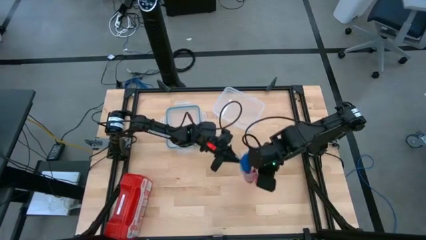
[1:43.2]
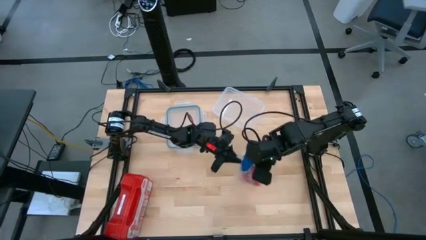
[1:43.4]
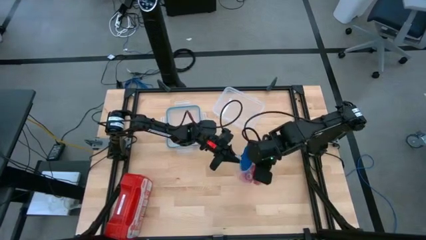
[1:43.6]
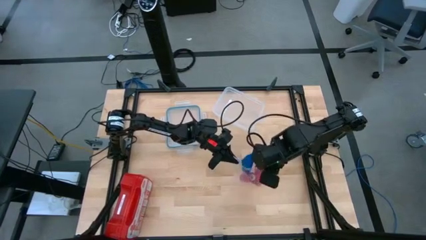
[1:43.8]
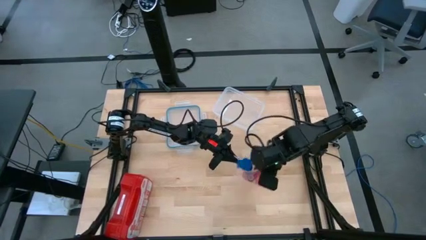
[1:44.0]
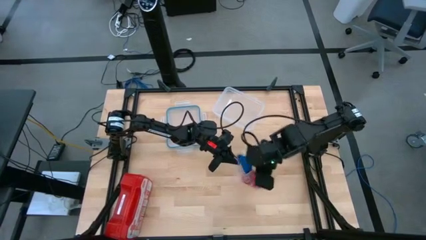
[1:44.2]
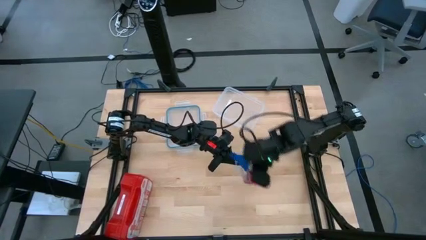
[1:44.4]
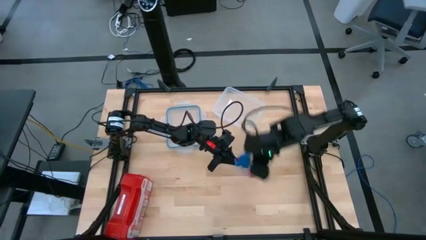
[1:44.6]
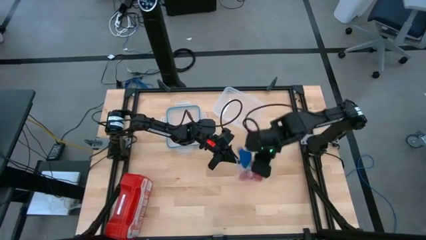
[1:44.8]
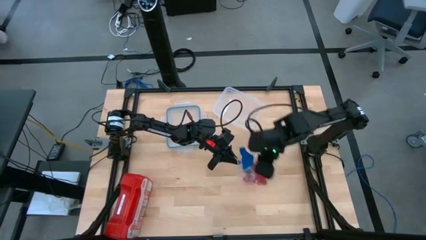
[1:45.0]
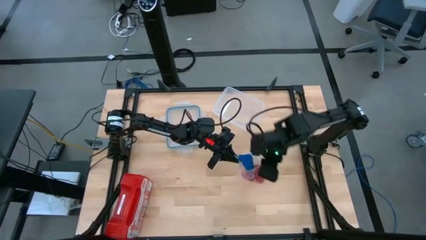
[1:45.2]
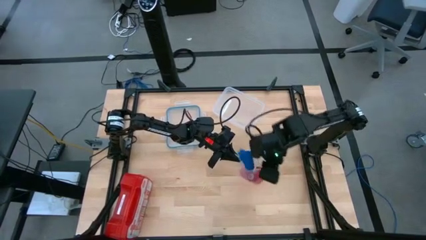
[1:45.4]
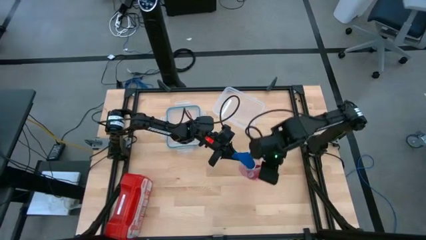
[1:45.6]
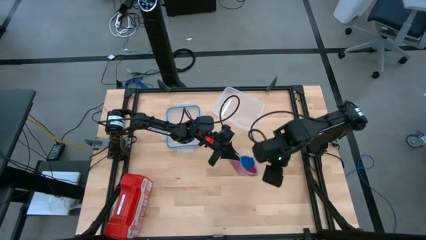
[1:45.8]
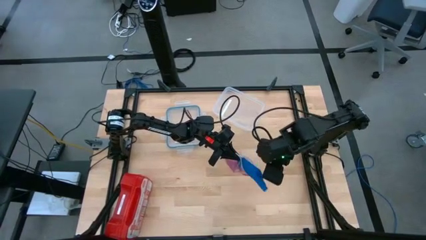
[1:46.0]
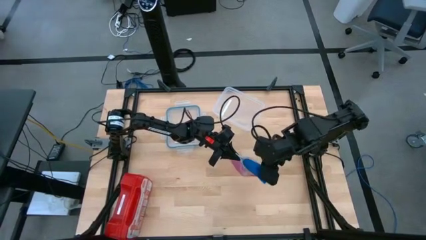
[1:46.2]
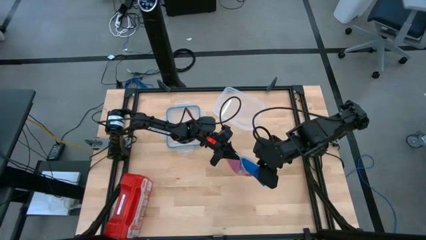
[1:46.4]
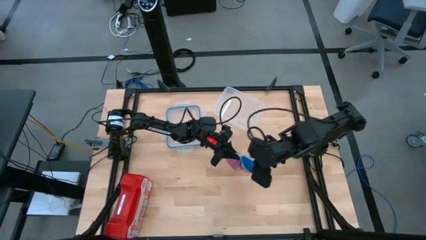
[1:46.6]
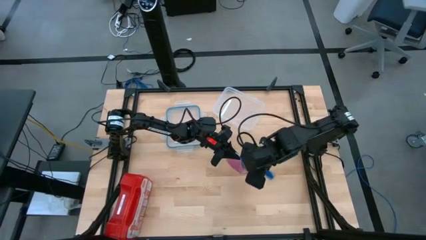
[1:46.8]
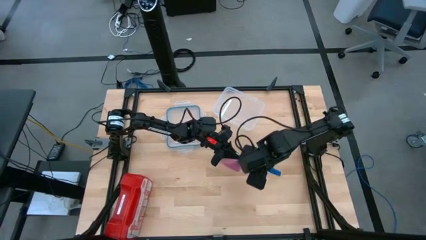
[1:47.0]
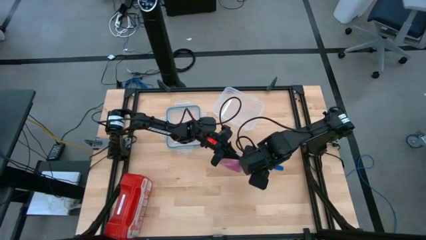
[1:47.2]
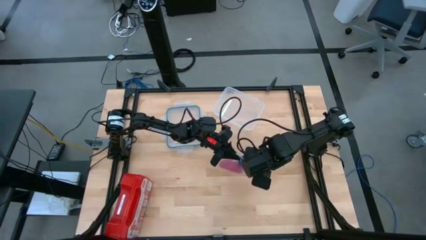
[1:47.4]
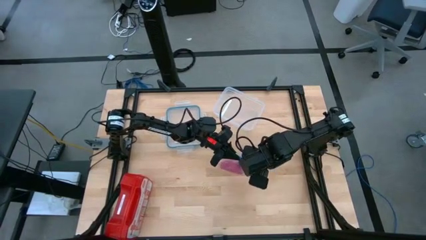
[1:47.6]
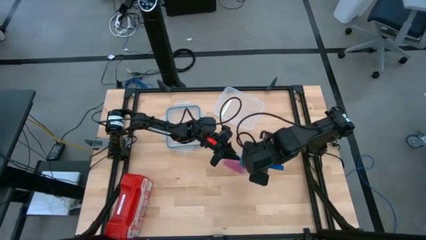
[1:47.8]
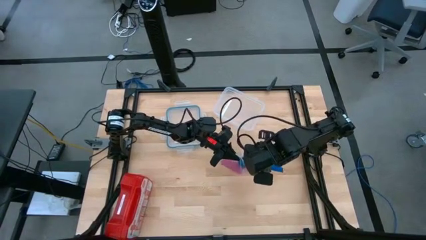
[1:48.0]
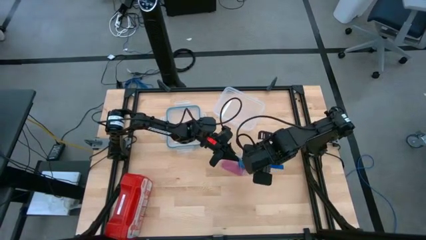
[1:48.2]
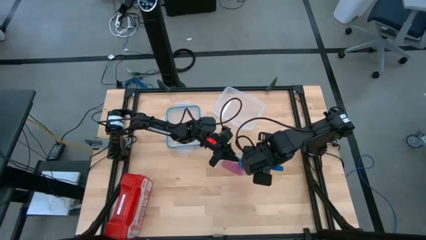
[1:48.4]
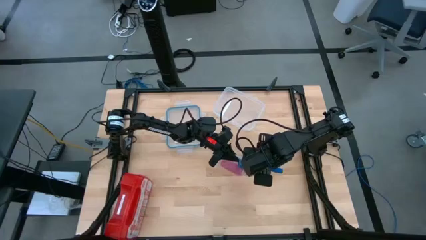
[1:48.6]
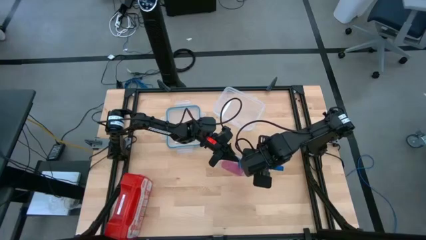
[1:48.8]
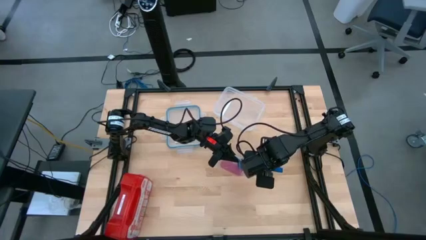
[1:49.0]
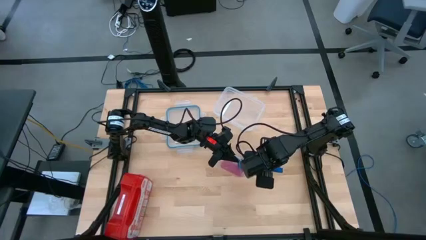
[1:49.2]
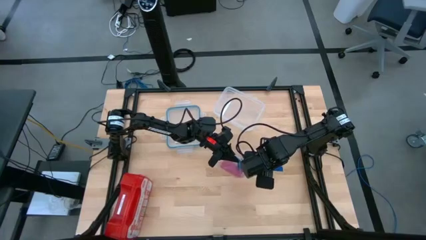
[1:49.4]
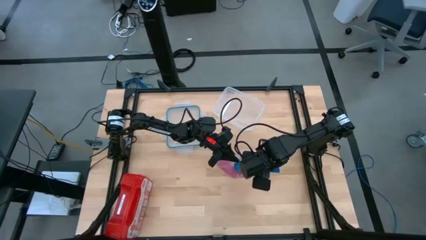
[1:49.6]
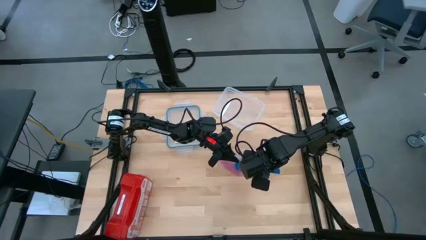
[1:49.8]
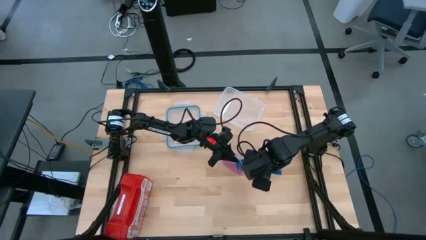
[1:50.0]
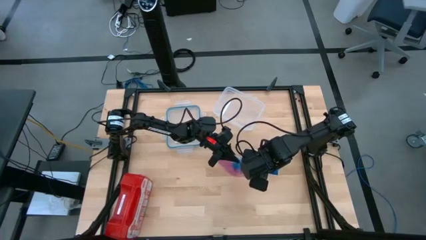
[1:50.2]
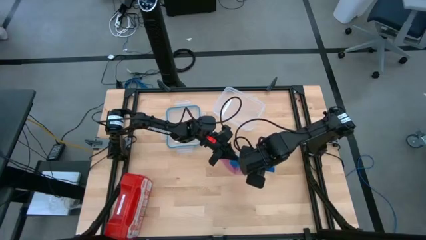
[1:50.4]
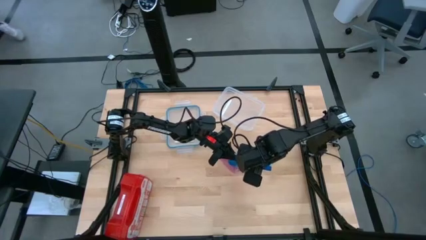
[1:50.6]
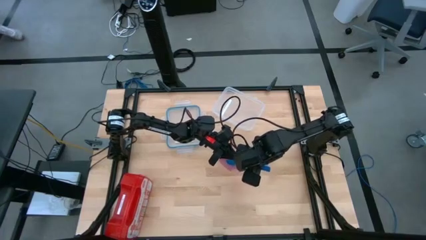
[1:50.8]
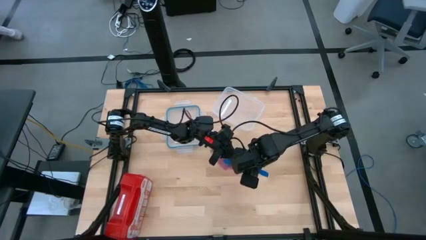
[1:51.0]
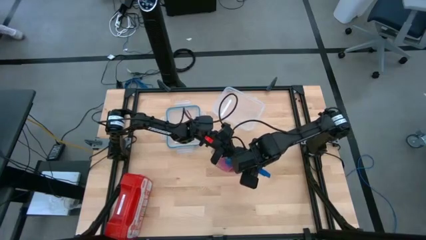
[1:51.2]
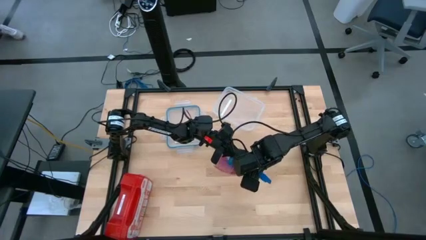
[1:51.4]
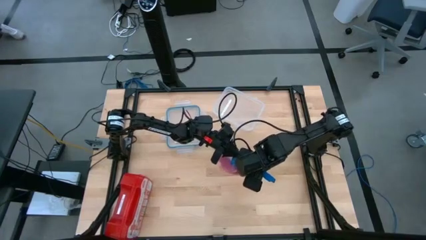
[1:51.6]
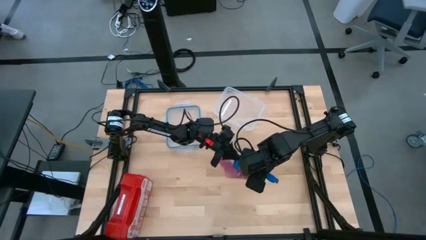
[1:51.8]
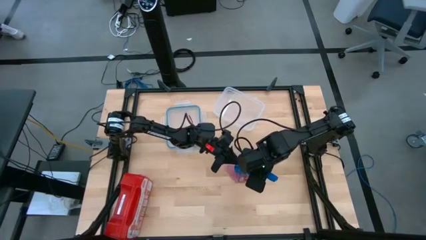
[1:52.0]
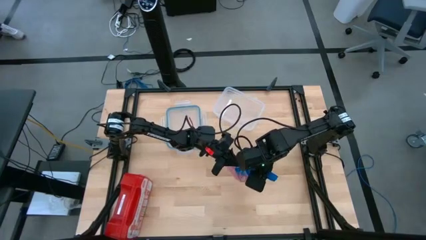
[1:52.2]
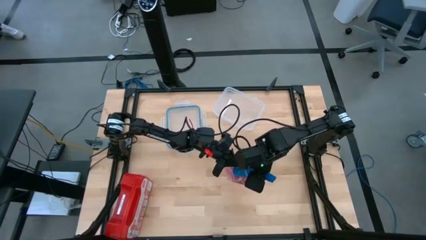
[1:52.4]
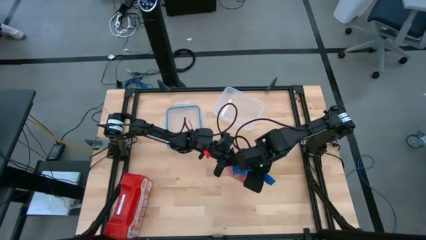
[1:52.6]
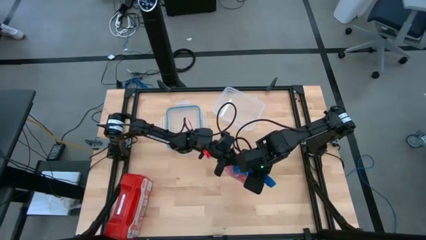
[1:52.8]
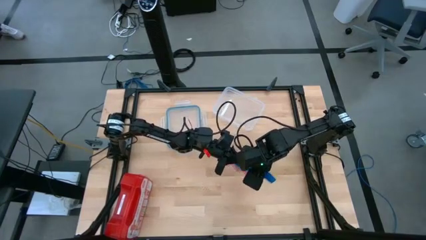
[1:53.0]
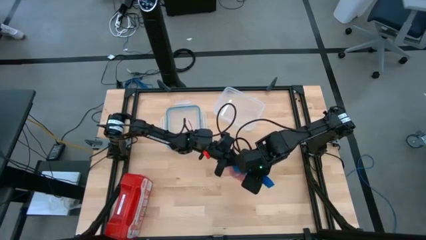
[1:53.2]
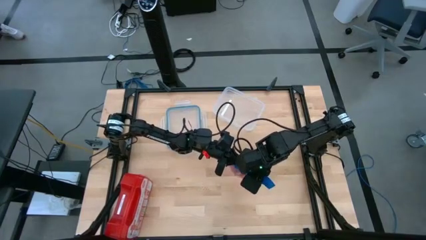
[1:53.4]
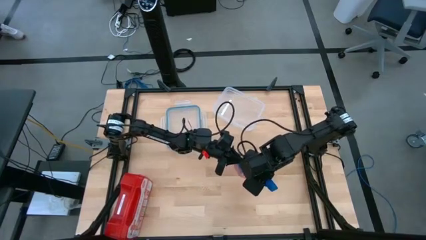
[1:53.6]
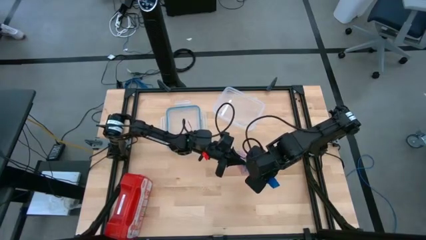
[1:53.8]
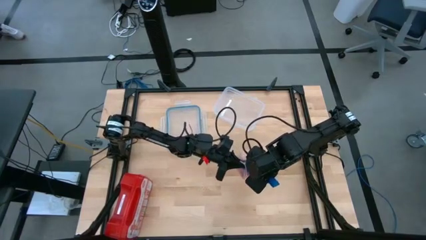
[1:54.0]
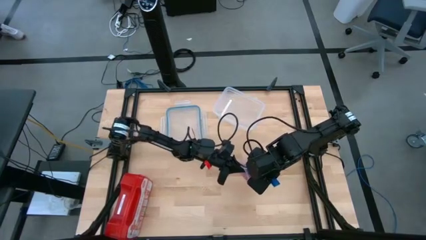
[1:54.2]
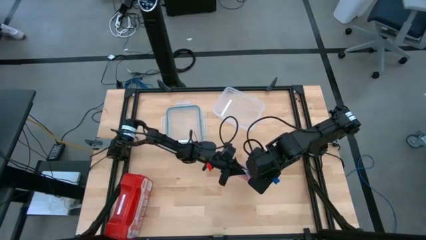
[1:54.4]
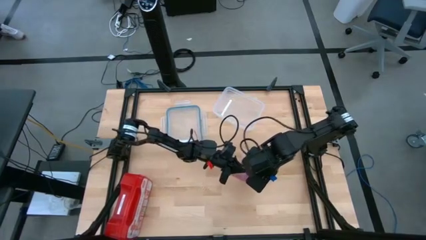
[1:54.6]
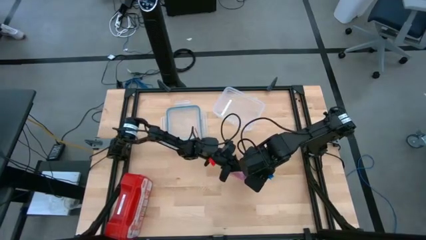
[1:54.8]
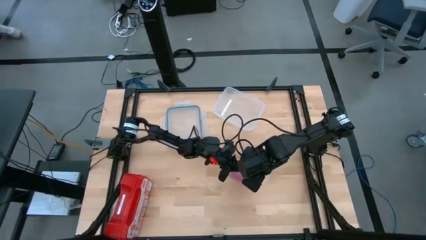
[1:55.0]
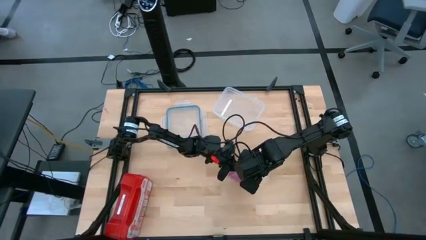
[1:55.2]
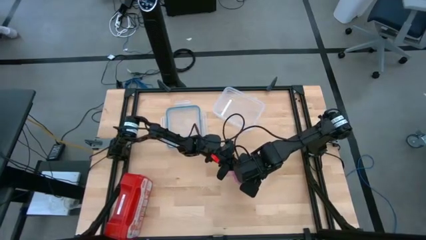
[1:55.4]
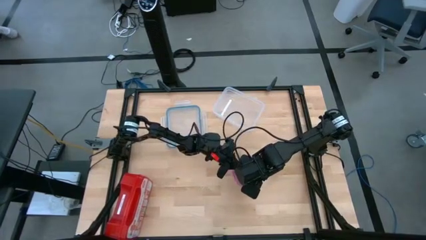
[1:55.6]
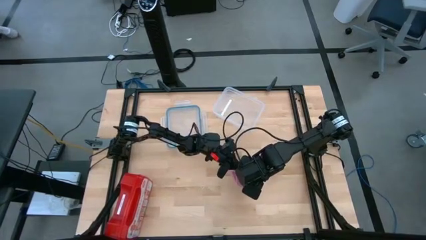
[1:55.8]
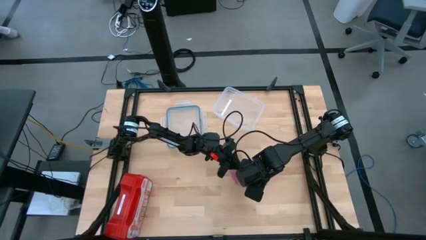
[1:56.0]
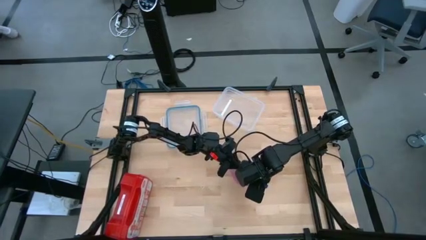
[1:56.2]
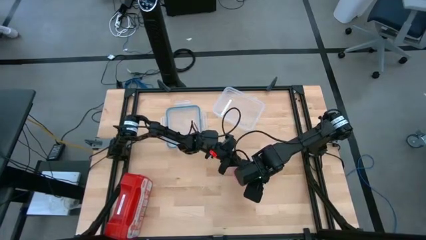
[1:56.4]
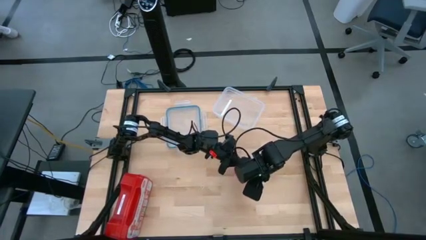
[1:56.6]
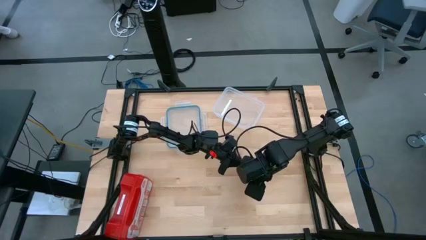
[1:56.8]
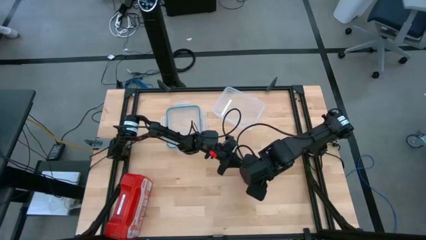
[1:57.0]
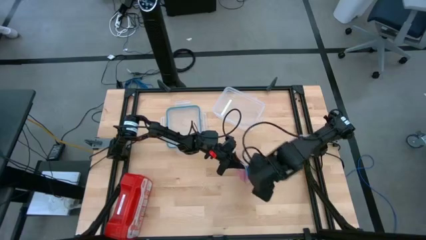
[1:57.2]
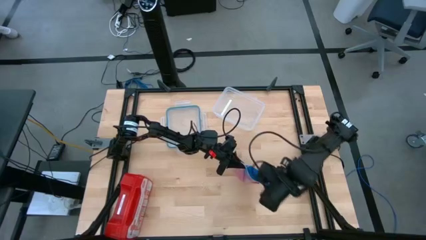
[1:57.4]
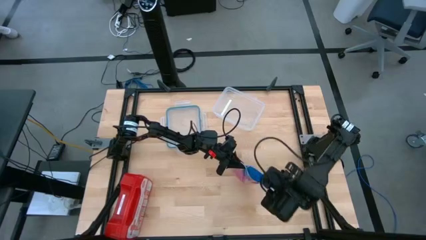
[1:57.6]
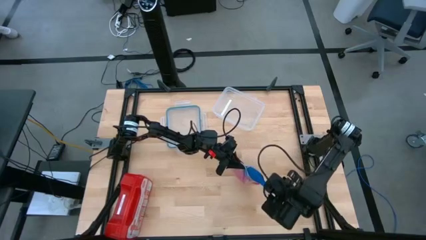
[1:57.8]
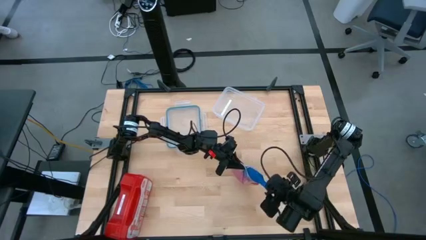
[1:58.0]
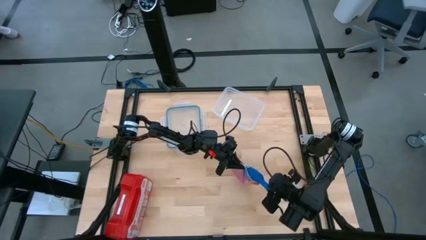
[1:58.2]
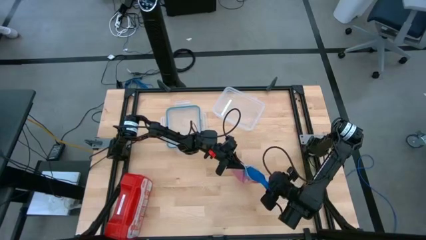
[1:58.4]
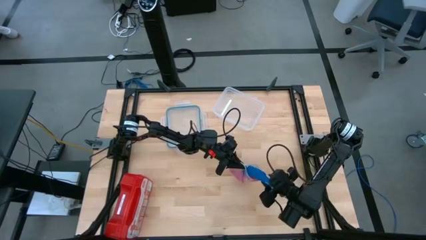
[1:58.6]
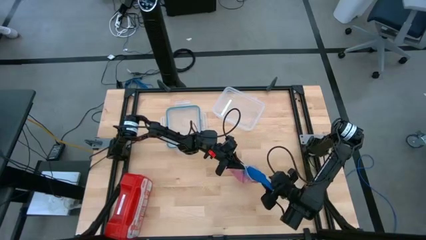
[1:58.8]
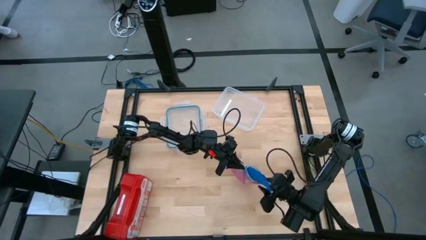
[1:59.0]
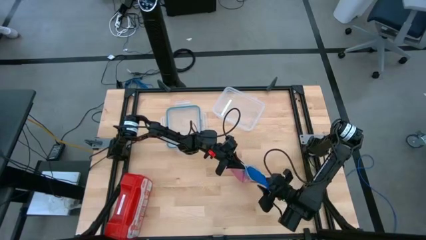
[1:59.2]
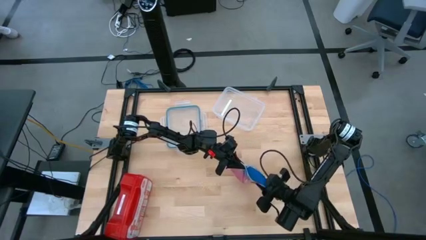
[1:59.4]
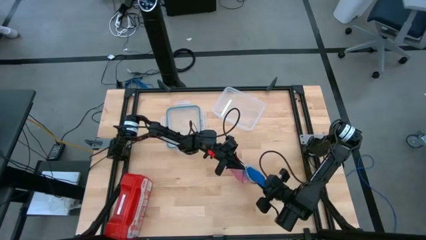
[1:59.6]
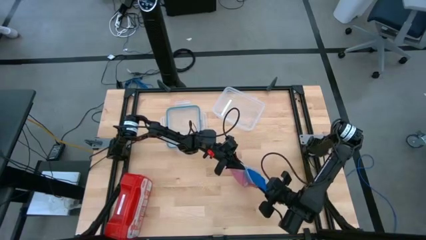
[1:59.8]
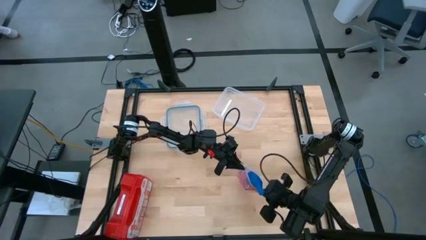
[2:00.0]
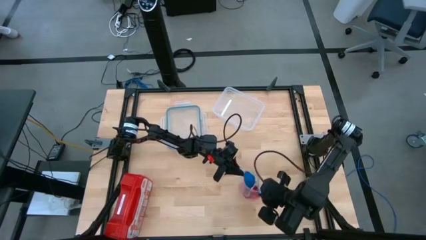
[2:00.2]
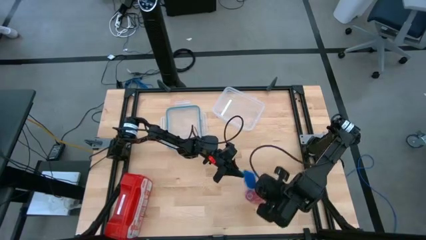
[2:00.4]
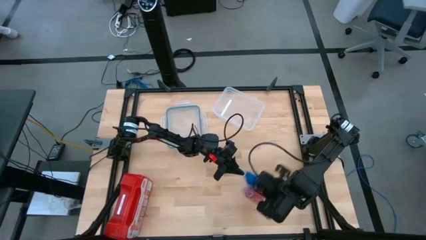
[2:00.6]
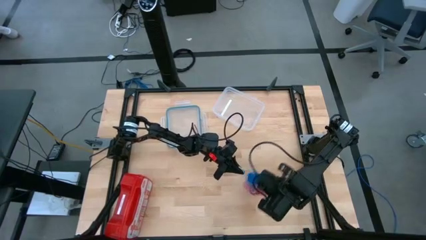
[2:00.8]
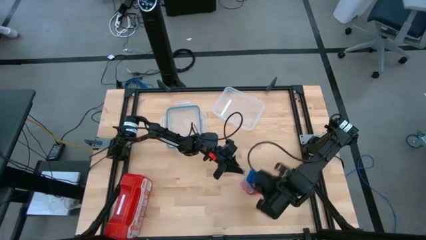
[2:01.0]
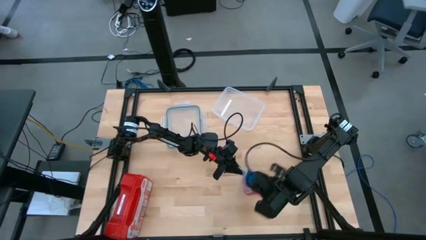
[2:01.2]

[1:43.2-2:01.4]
Task: Roll bandage
Put the blue bandage into the transparent zip bag
